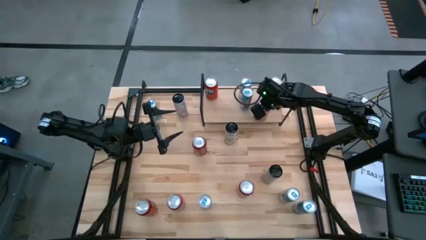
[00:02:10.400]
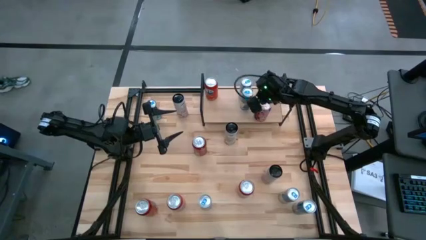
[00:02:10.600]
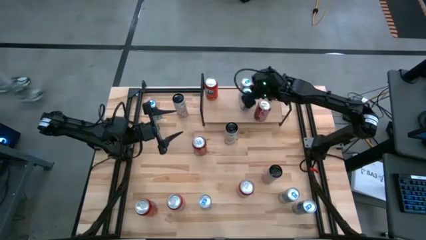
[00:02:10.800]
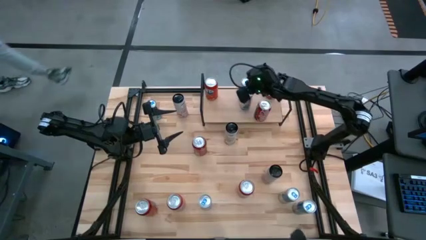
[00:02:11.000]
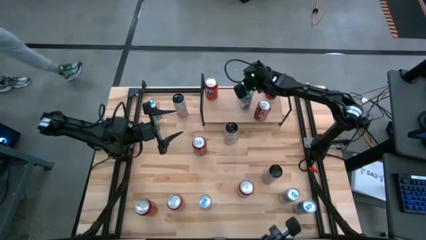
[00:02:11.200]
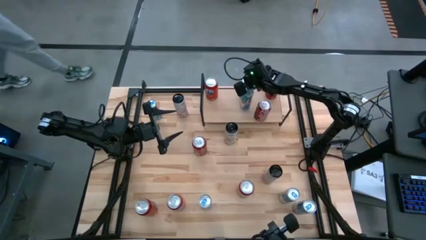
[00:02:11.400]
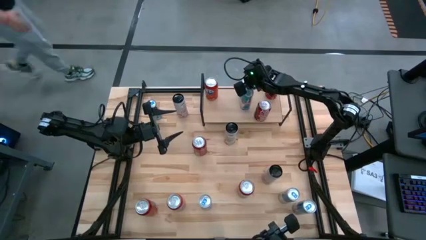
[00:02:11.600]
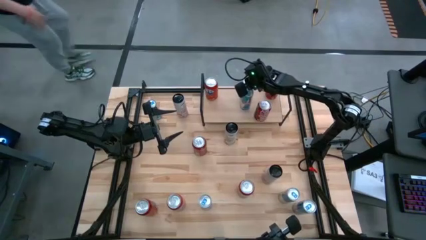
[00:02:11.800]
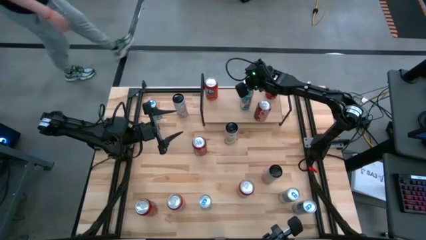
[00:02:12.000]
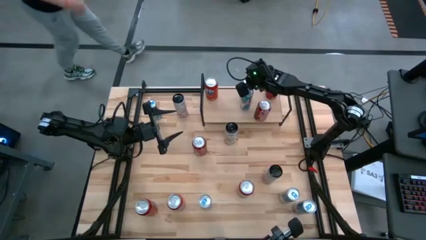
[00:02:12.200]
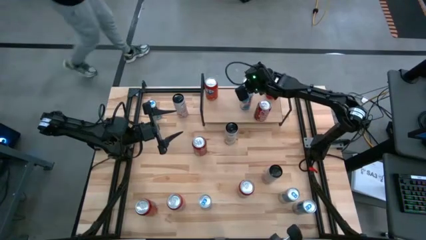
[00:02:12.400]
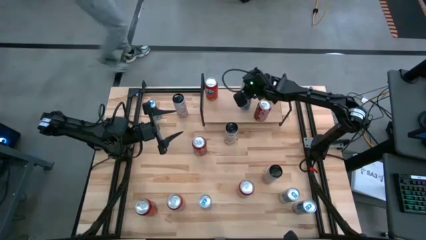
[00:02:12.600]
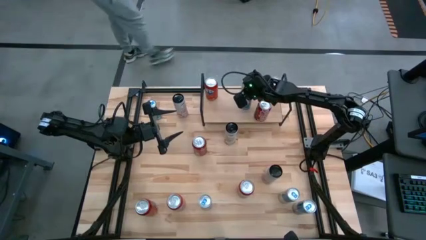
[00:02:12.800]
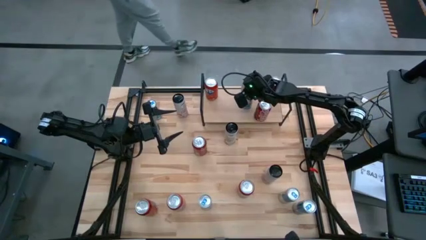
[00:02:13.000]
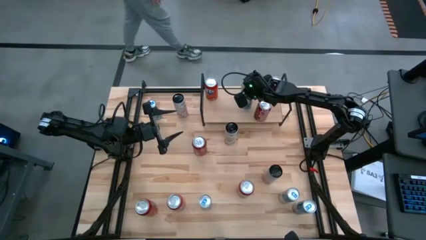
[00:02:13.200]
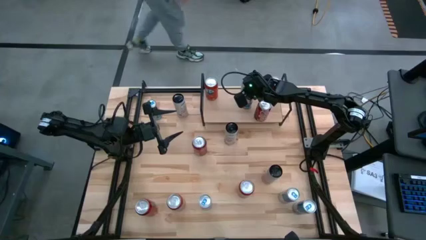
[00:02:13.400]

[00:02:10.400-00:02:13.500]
Task: Place canned beverage on shelf
Adjust the blue soda can on the shelf

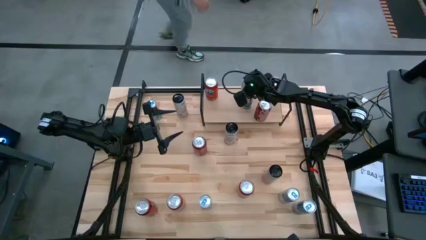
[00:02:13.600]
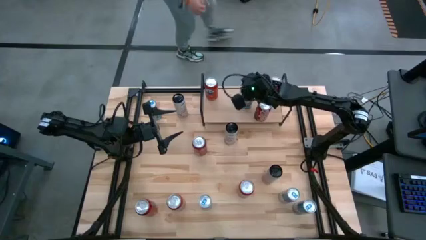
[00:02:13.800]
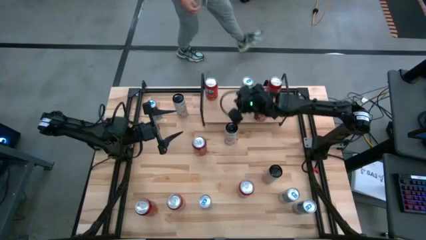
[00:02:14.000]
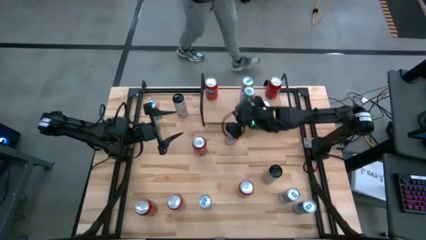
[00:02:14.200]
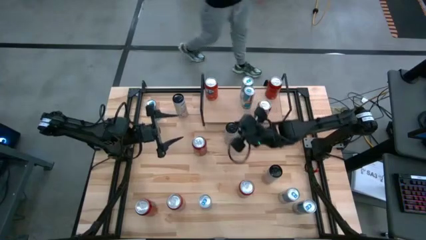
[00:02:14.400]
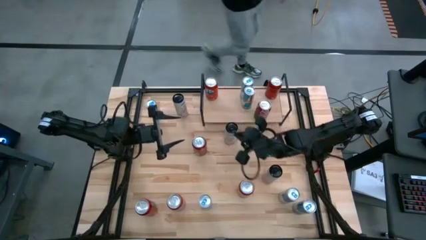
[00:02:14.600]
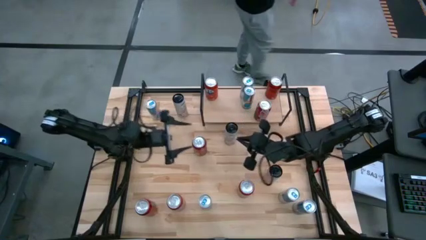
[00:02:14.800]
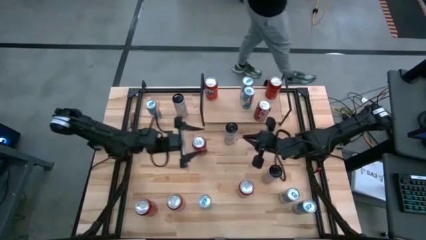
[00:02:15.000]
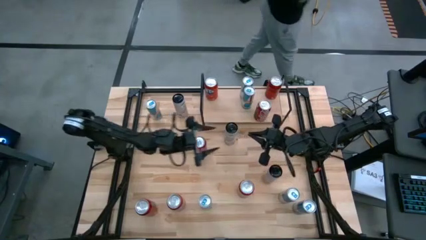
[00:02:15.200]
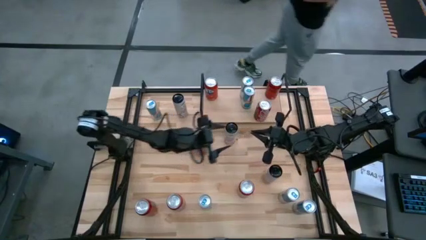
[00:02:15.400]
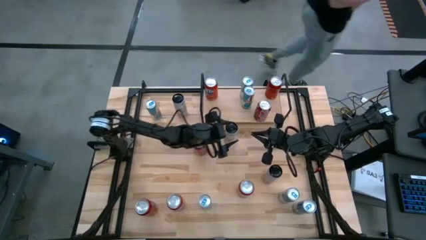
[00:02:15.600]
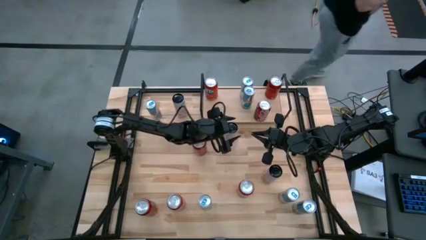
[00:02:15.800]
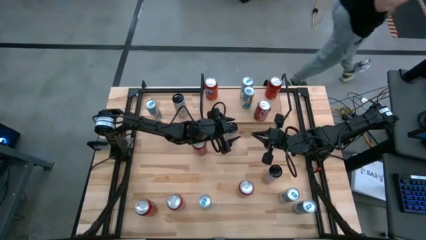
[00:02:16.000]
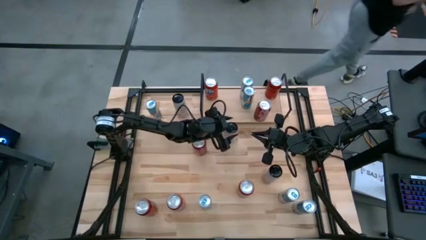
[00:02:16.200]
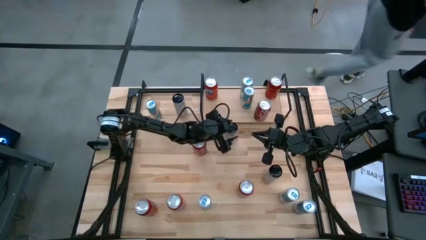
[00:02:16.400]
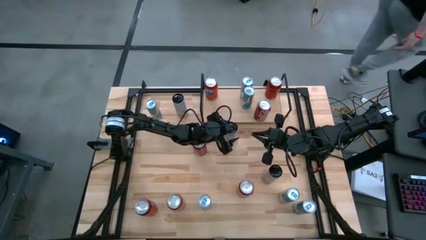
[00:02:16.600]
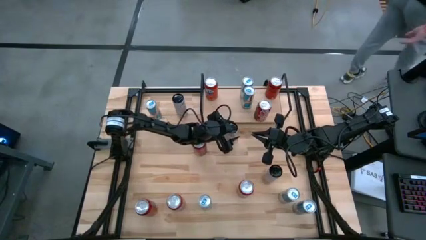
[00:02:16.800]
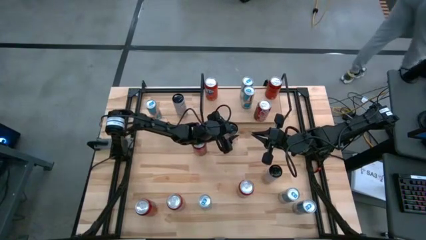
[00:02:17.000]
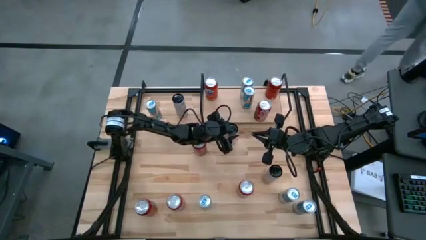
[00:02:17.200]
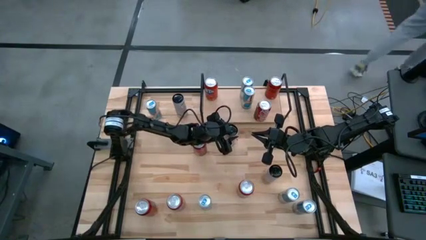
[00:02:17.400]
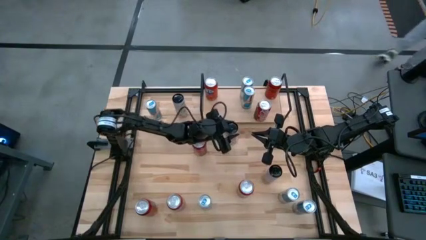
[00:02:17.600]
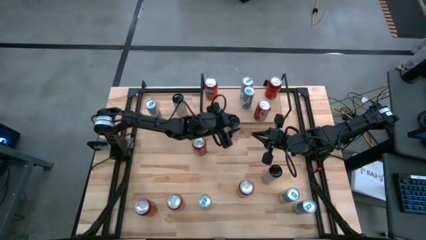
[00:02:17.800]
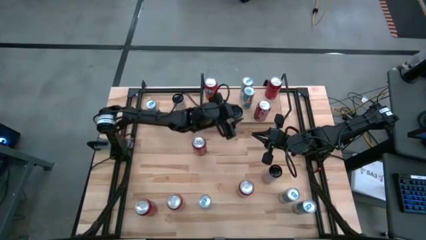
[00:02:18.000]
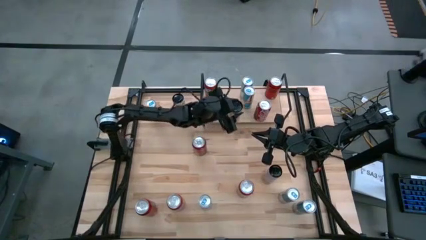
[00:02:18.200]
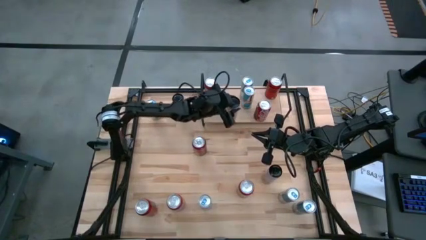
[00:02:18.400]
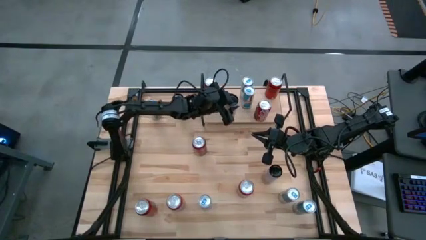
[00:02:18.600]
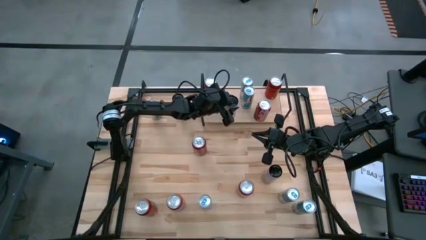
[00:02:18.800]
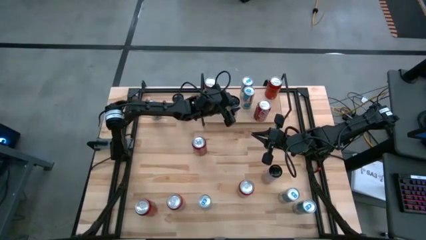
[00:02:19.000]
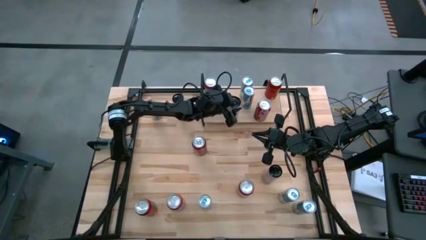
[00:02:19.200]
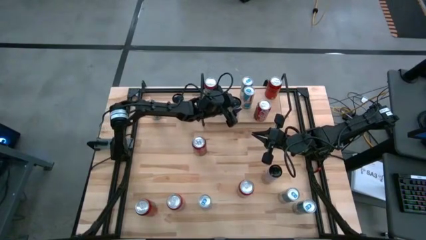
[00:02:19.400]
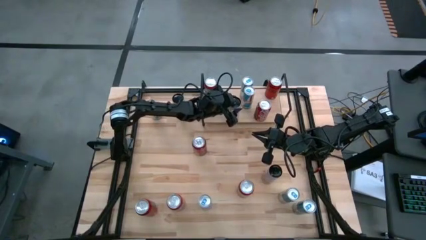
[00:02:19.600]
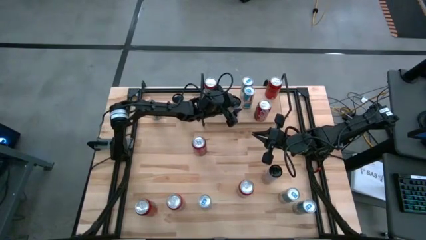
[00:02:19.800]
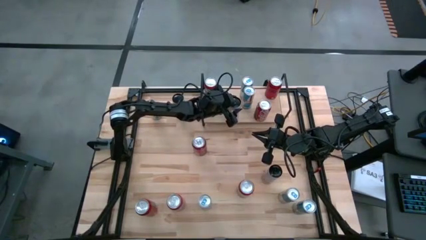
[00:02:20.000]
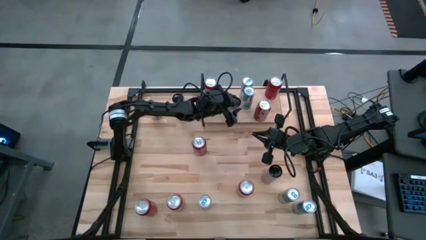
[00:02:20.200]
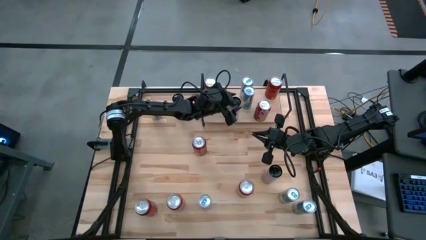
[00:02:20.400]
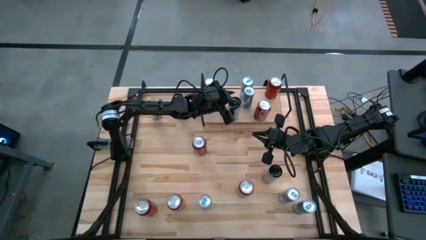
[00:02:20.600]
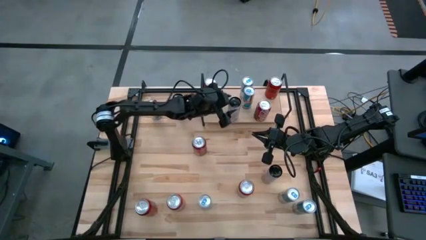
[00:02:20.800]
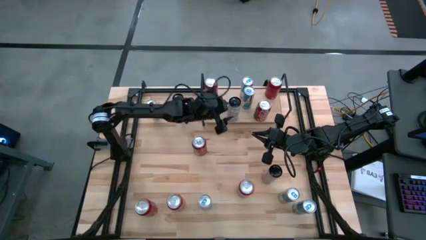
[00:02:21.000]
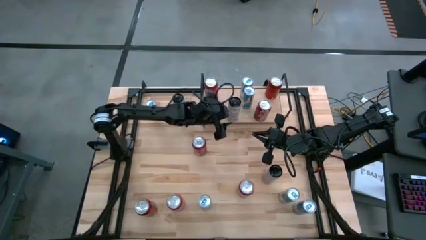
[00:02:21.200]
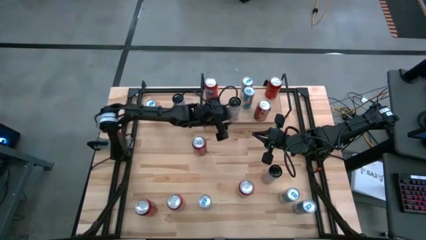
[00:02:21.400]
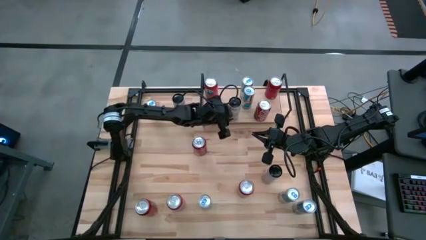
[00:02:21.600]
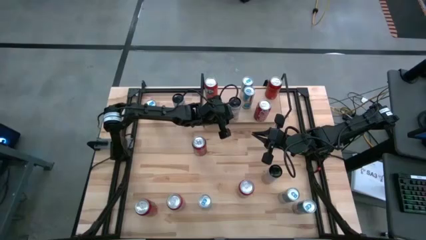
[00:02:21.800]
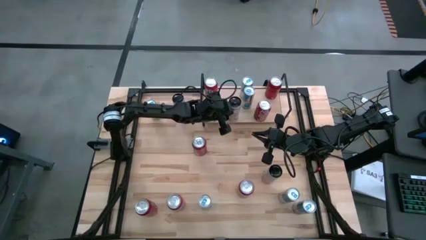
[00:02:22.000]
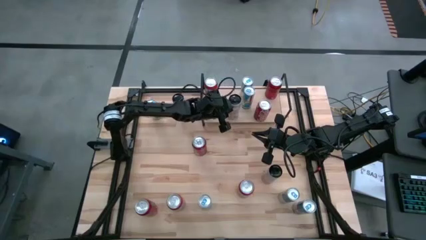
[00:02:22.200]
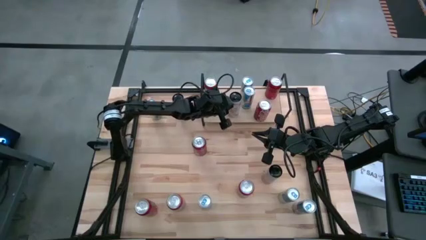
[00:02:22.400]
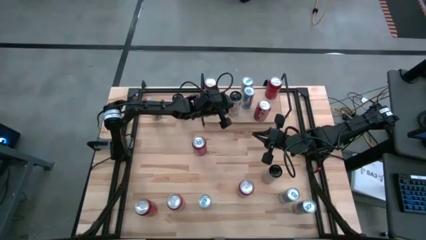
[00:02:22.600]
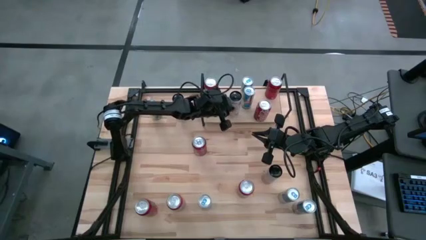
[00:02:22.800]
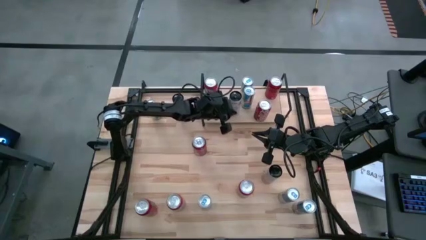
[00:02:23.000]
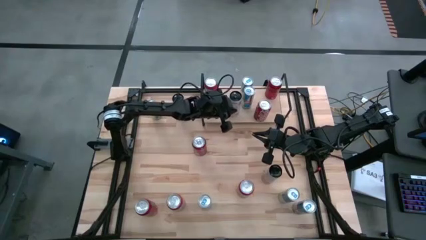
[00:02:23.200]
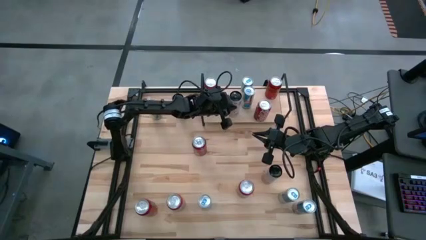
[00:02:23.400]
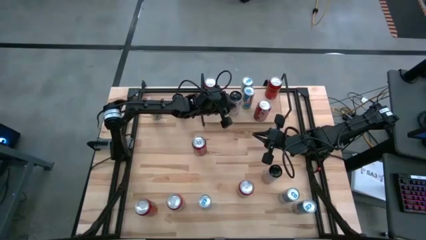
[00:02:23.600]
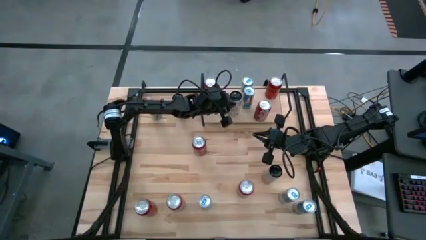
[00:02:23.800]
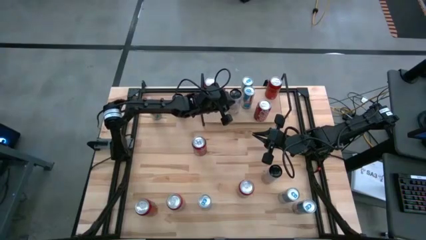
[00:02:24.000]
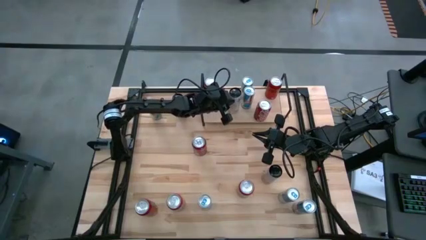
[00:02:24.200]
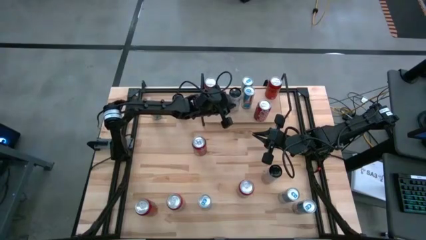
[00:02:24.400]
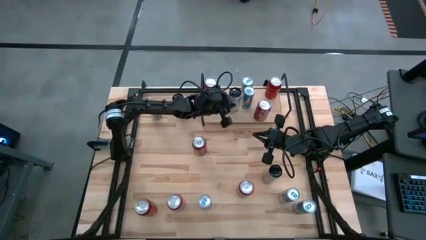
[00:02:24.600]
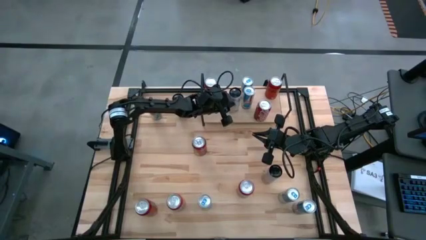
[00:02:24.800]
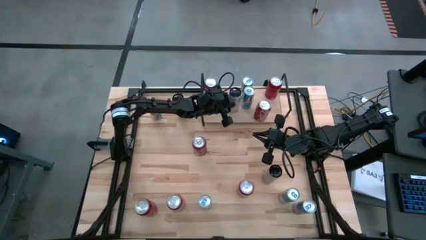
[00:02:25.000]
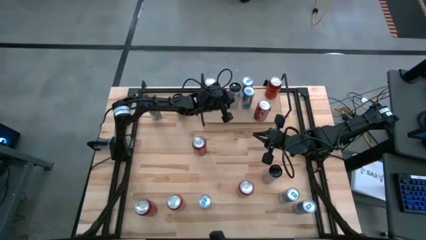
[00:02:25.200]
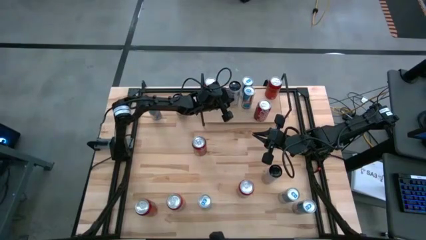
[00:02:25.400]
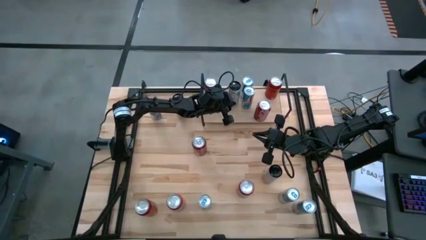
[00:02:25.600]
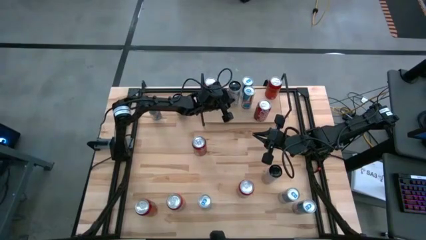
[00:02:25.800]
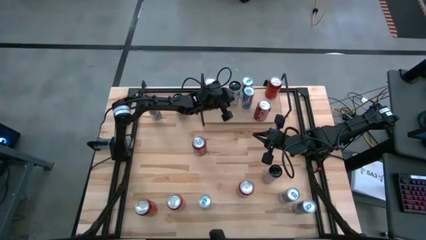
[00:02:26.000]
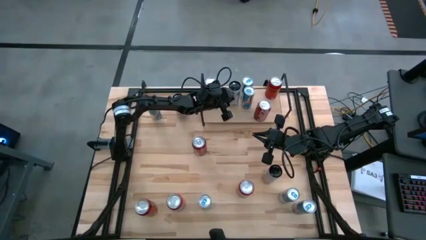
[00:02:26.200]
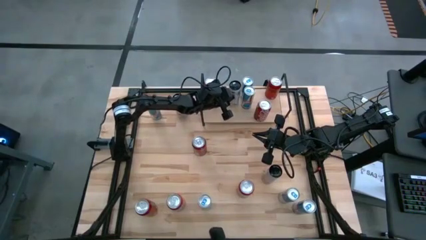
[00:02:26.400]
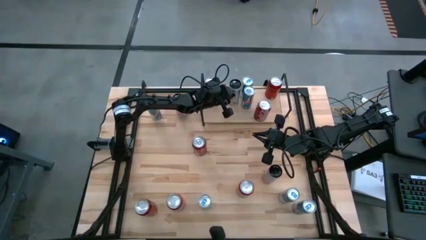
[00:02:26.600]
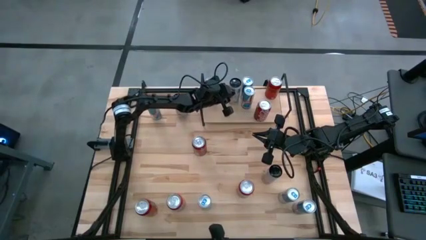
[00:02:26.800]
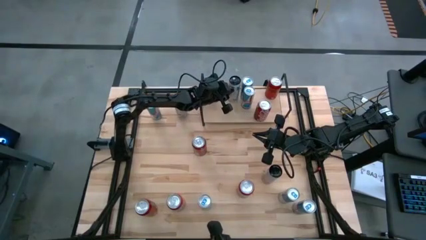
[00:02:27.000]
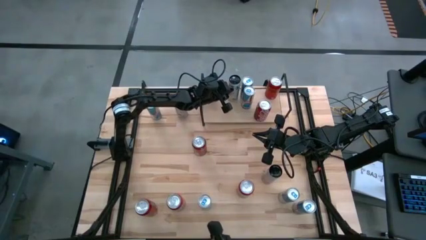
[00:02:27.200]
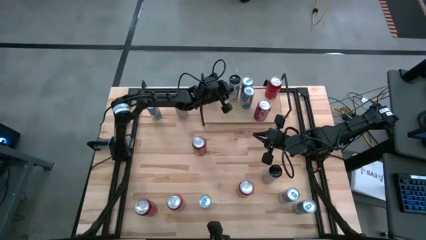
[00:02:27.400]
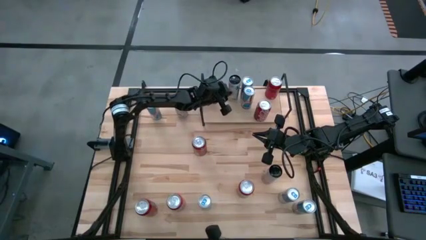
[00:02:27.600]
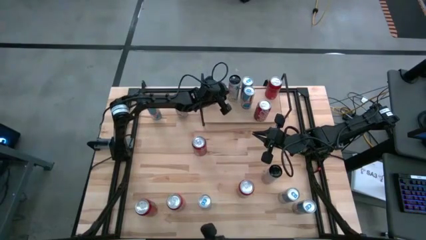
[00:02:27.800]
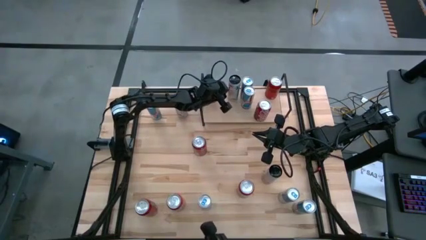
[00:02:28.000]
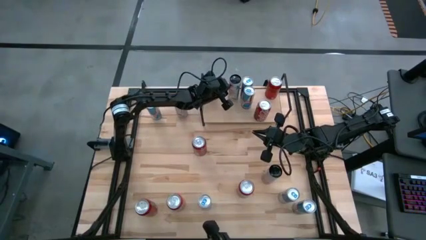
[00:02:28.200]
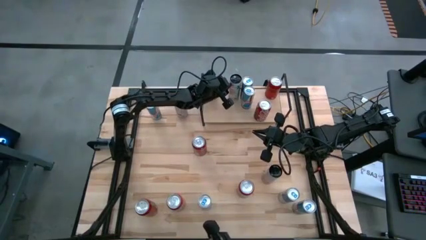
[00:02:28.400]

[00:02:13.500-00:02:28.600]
Put the white soda can on the shelf
